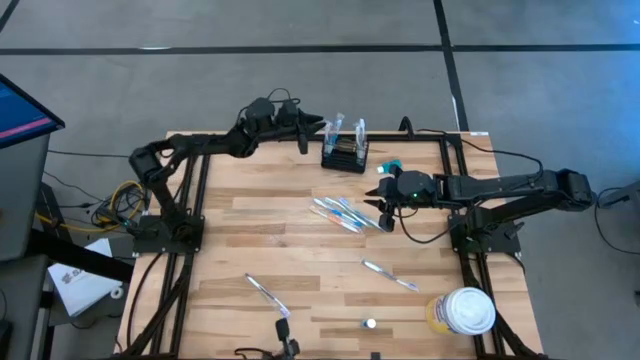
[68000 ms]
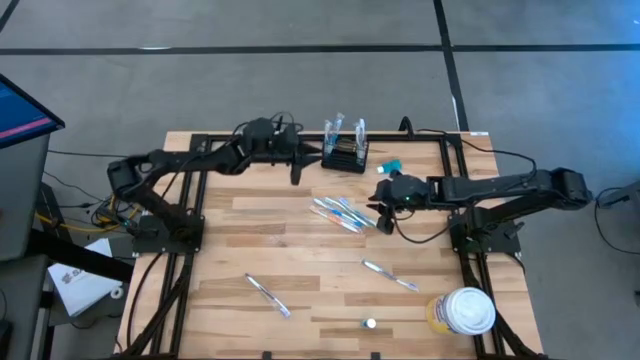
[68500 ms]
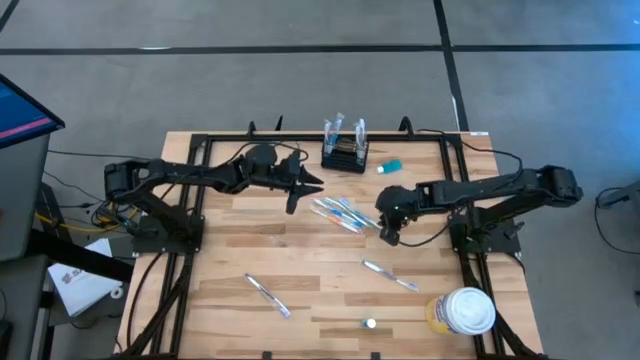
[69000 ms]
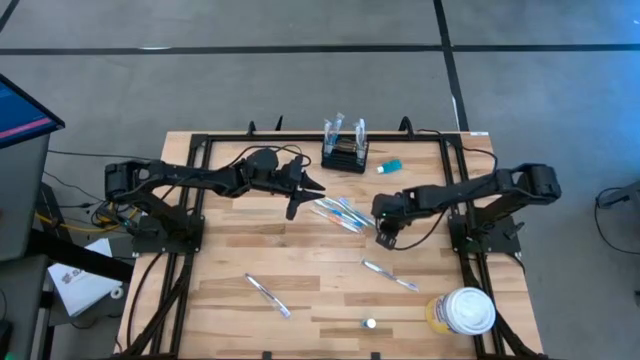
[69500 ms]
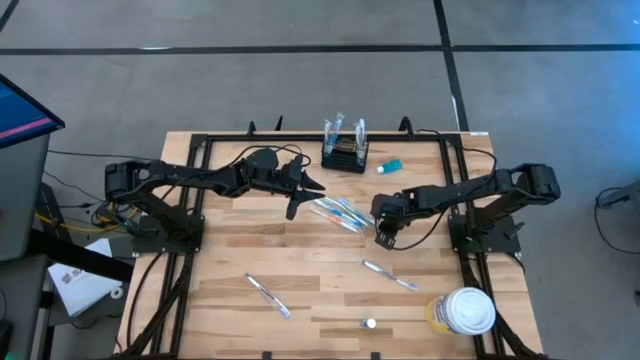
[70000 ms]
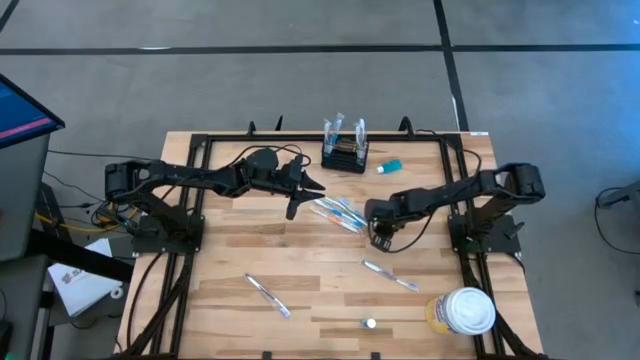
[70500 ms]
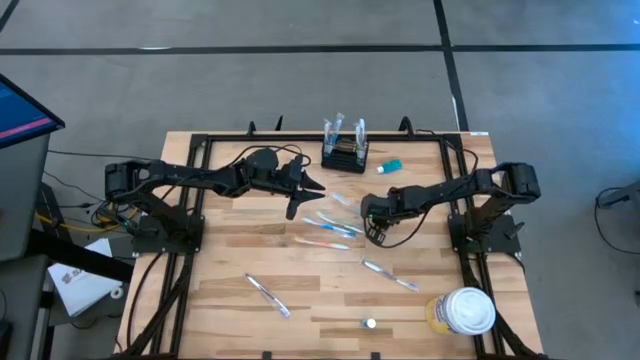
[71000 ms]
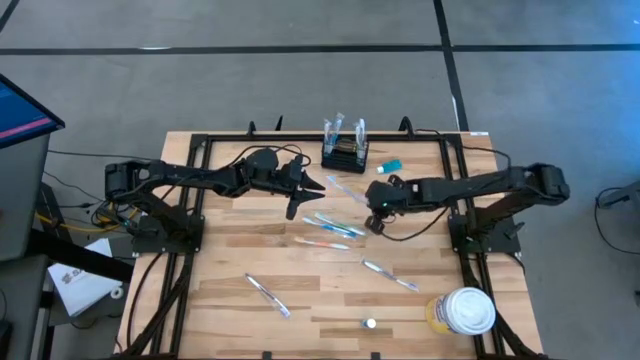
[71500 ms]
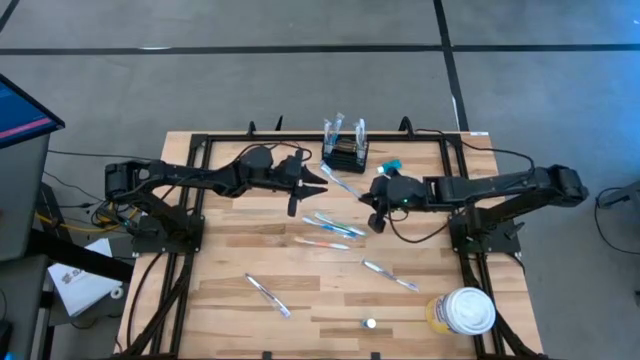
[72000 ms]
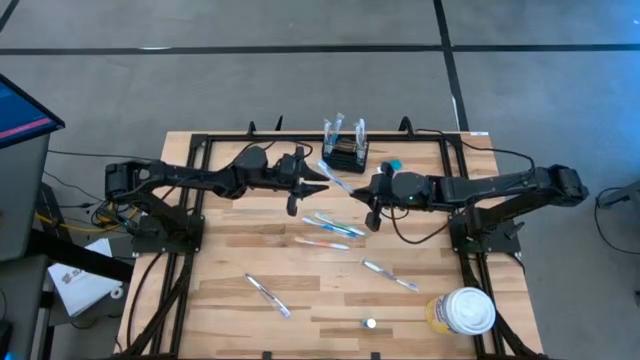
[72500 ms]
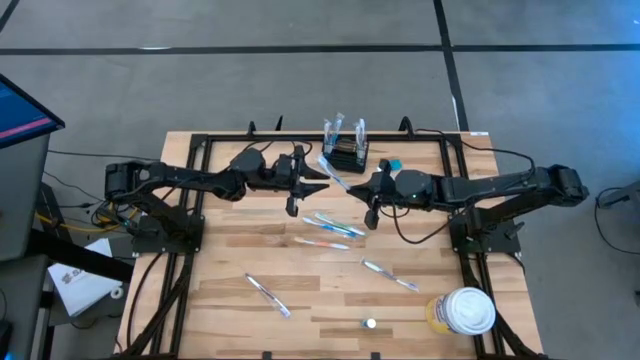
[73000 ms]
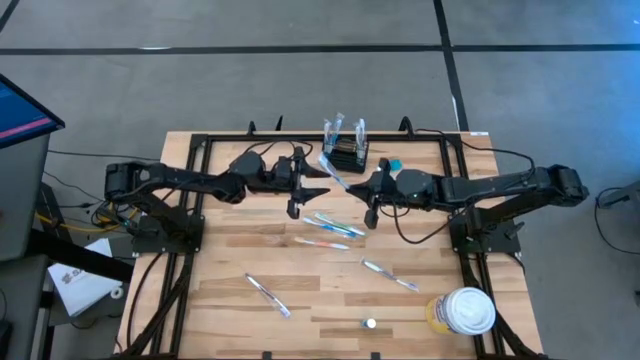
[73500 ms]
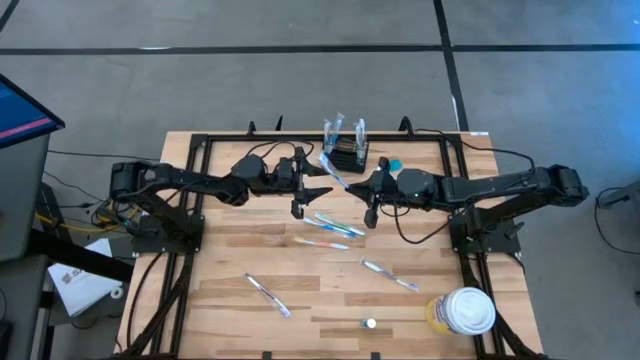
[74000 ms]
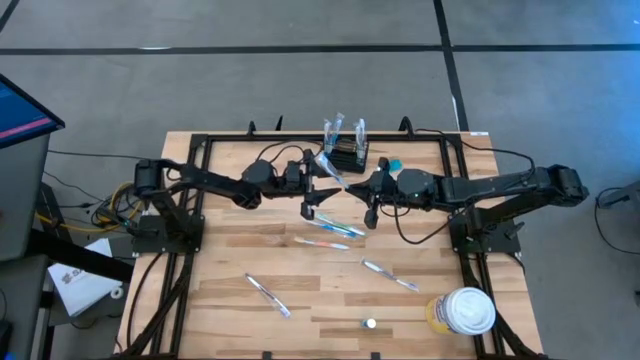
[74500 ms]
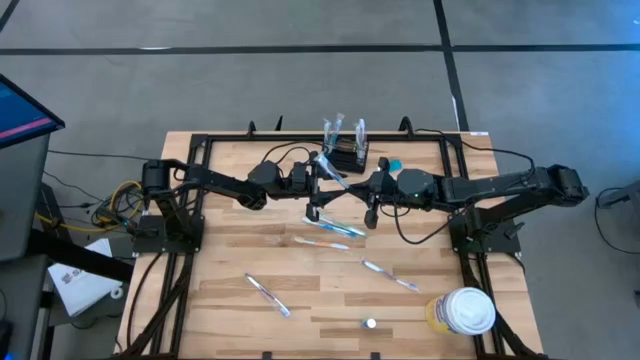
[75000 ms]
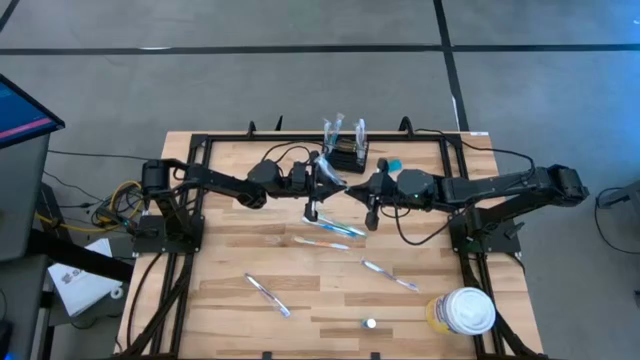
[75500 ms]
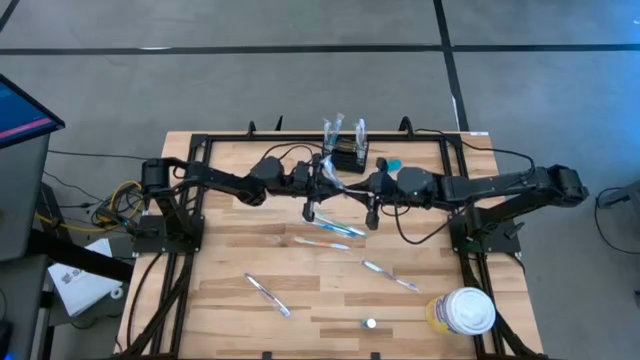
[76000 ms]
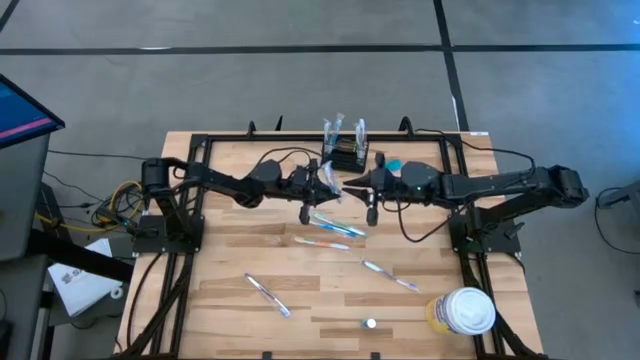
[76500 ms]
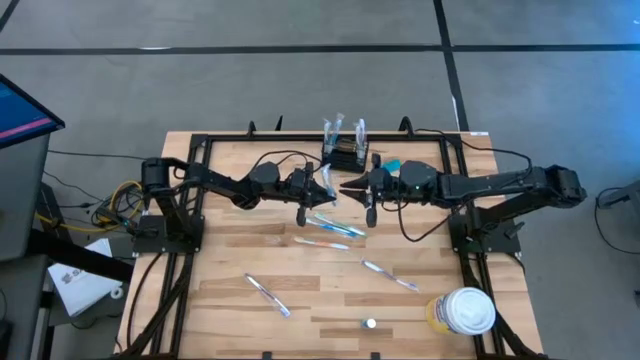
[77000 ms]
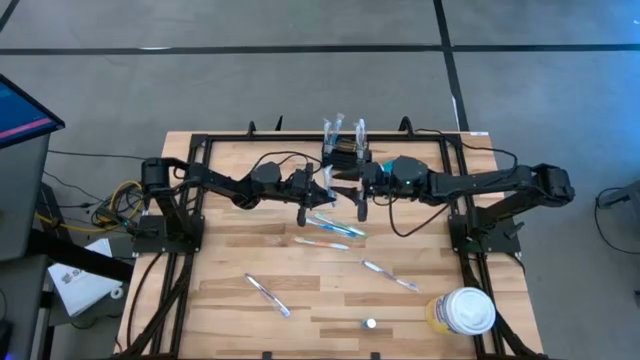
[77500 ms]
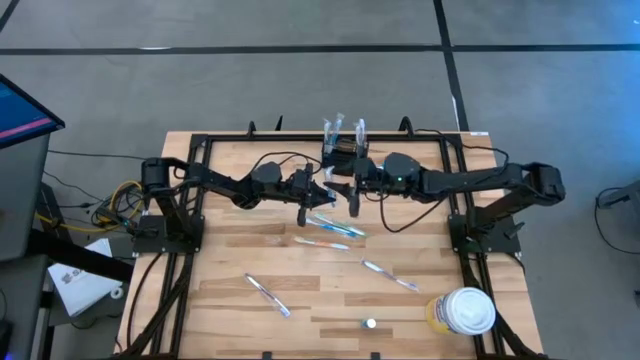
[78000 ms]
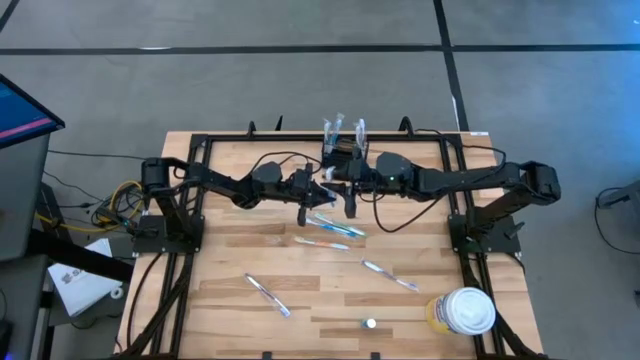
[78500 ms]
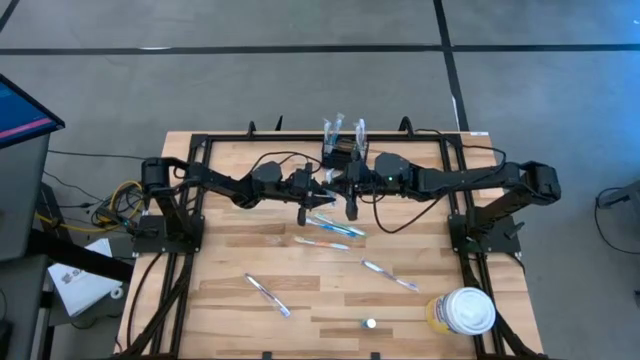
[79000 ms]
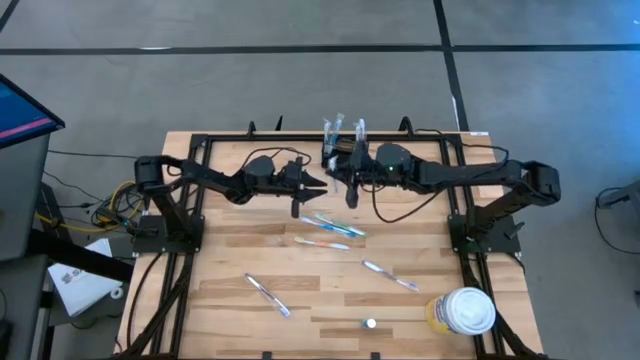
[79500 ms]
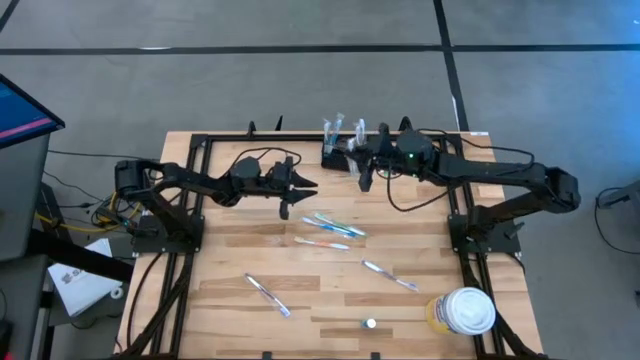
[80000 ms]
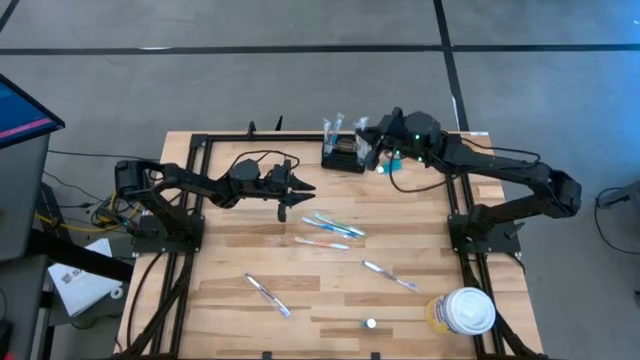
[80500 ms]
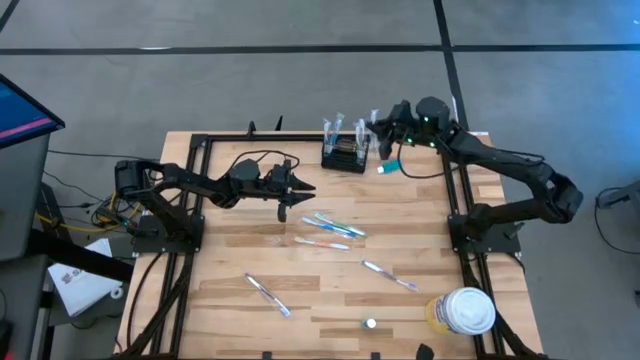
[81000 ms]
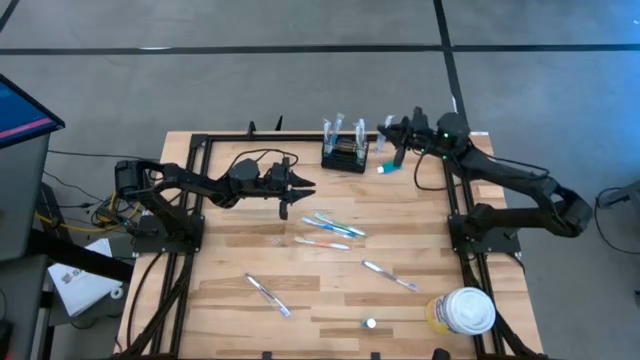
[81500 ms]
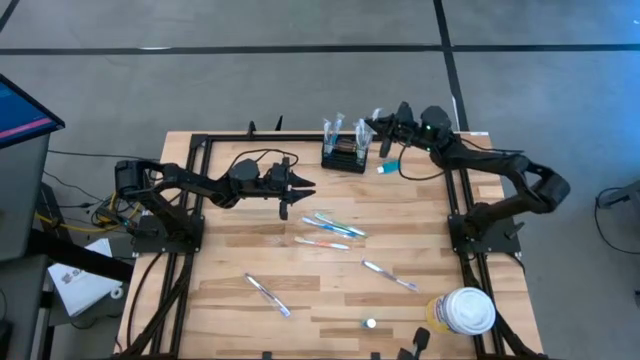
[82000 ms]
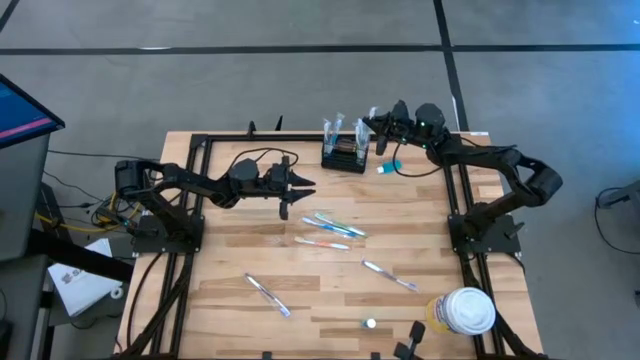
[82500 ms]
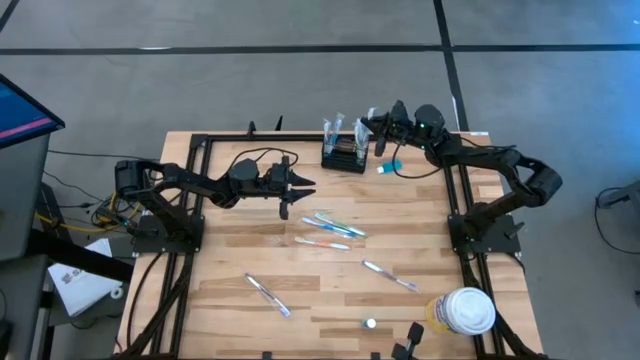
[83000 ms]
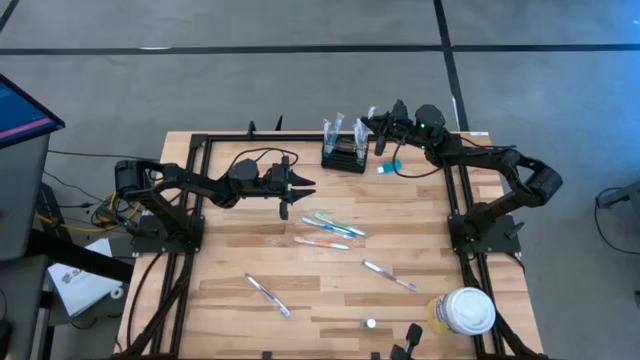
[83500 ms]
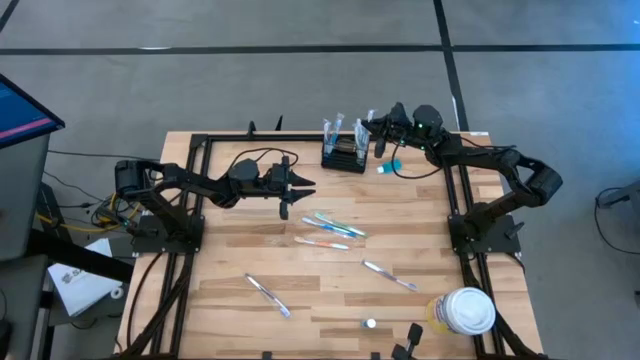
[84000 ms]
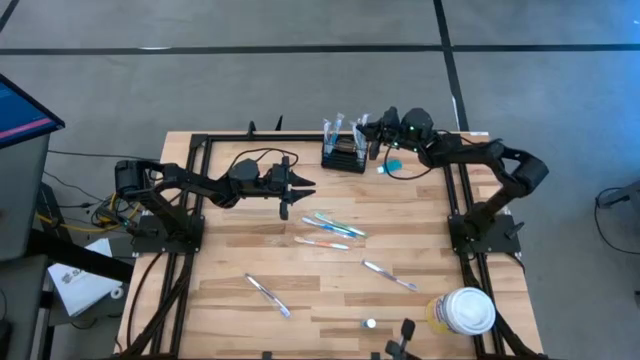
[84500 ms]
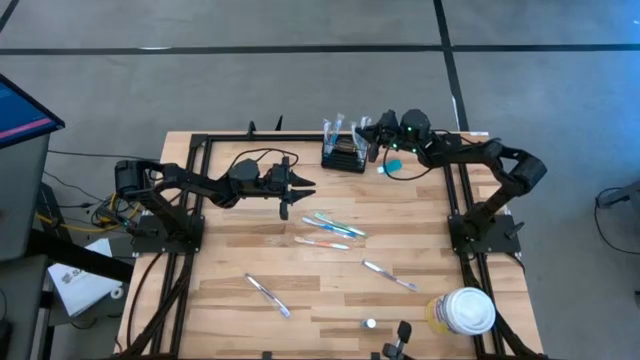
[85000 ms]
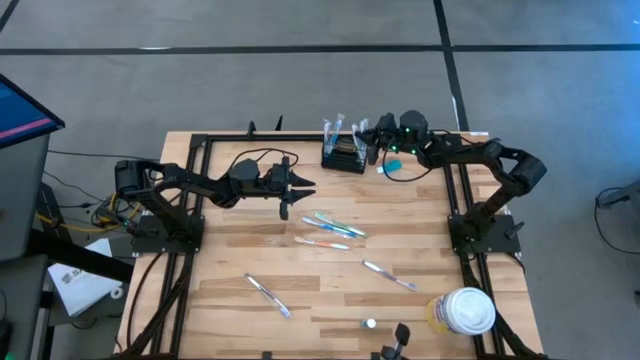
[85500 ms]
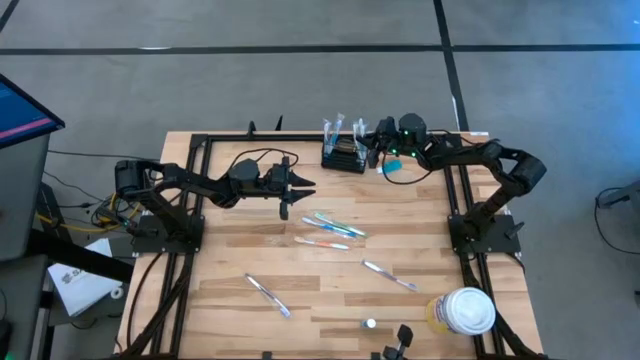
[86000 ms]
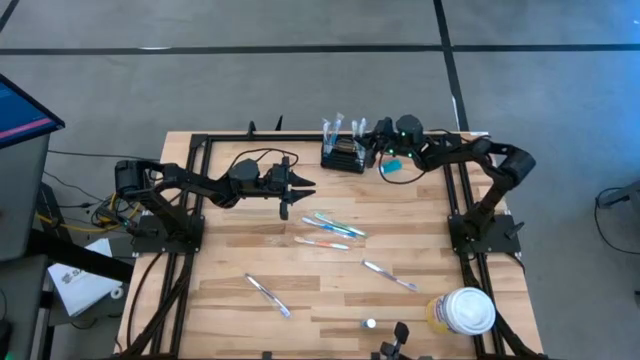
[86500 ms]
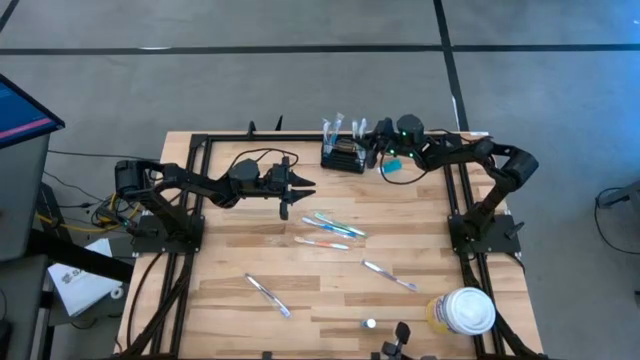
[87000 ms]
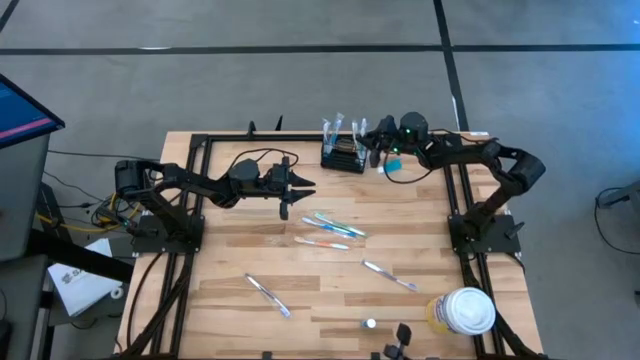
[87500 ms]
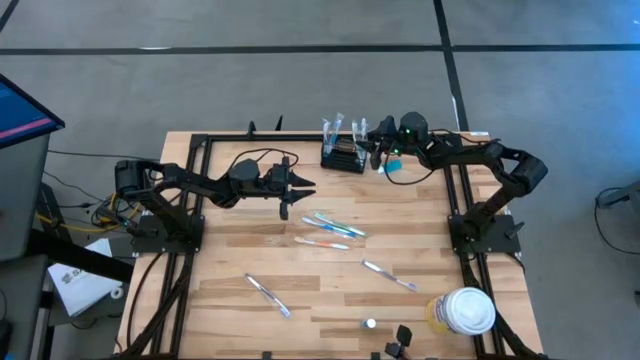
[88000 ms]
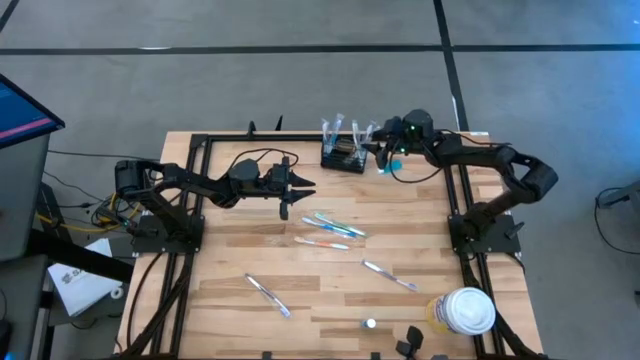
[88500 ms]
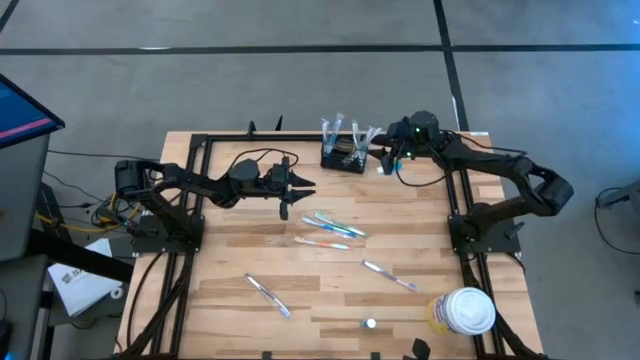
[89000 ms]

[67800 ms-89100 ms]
Task: Pick & Place toothbrushing station
Put the top blue toothbrush into the mesh organizer
